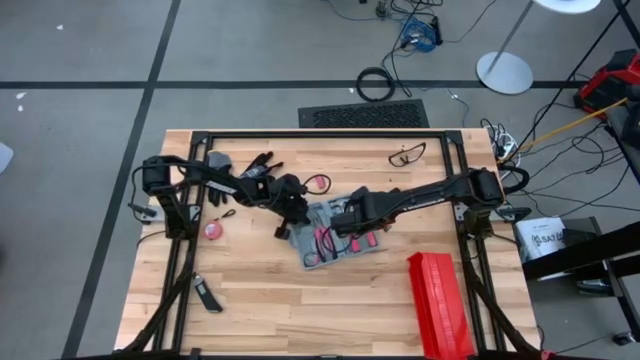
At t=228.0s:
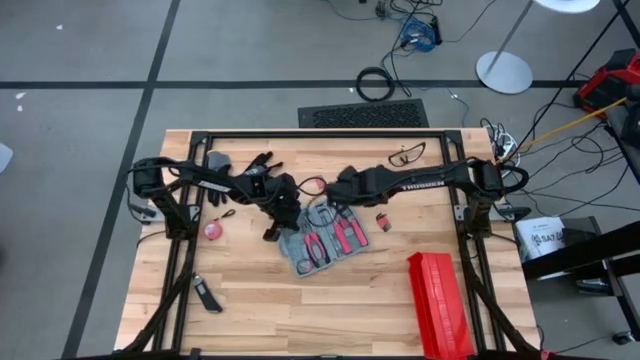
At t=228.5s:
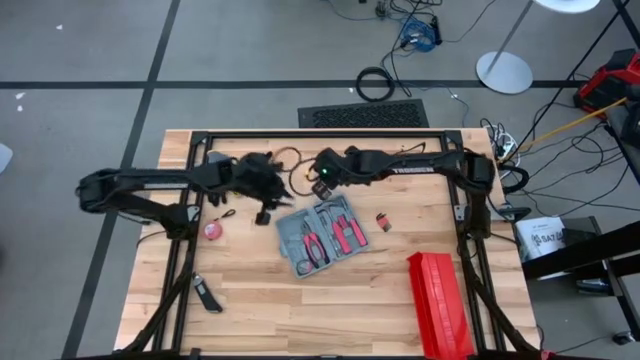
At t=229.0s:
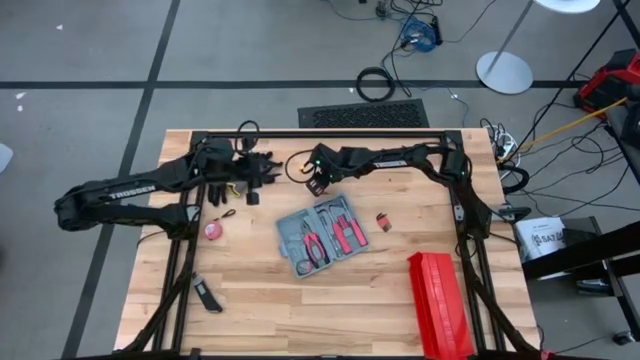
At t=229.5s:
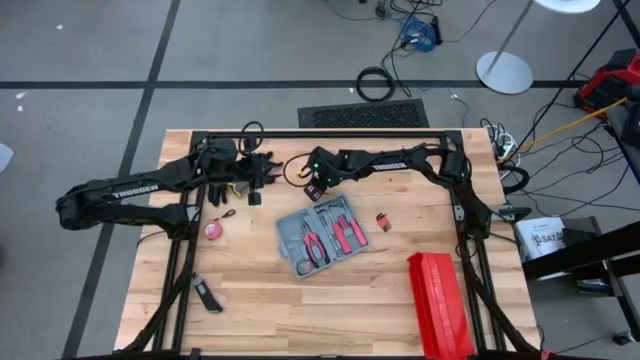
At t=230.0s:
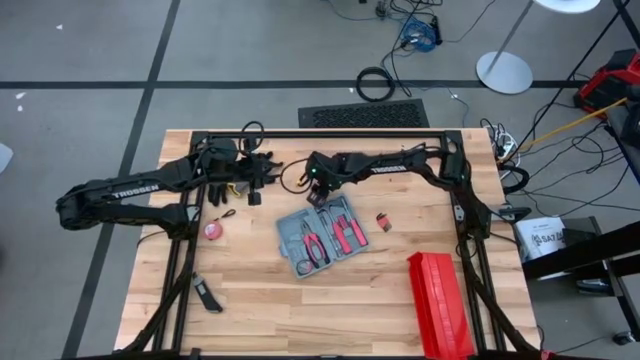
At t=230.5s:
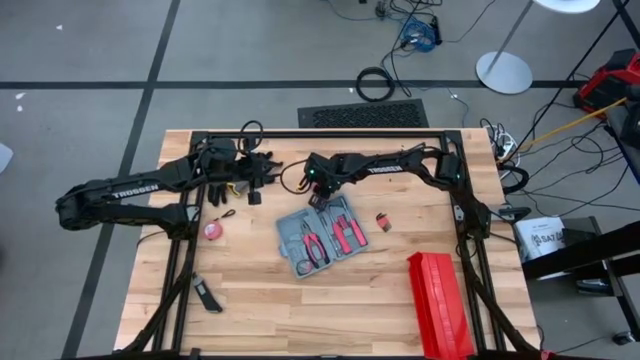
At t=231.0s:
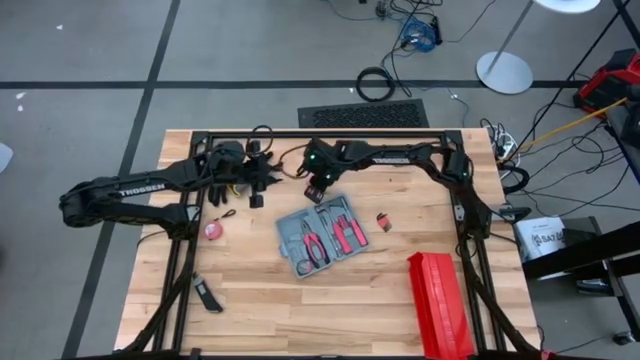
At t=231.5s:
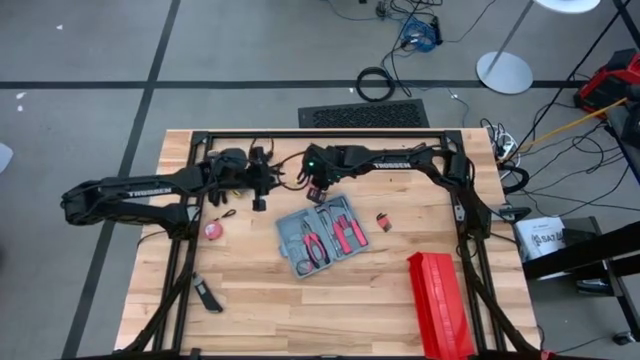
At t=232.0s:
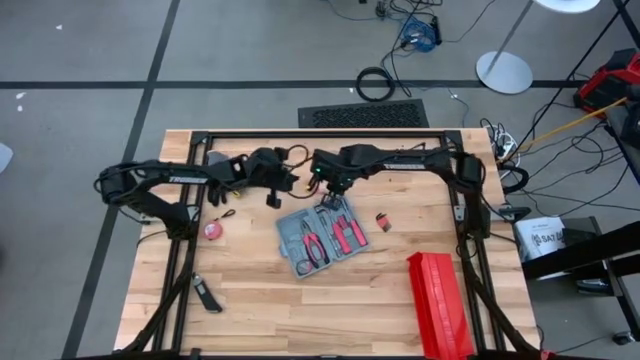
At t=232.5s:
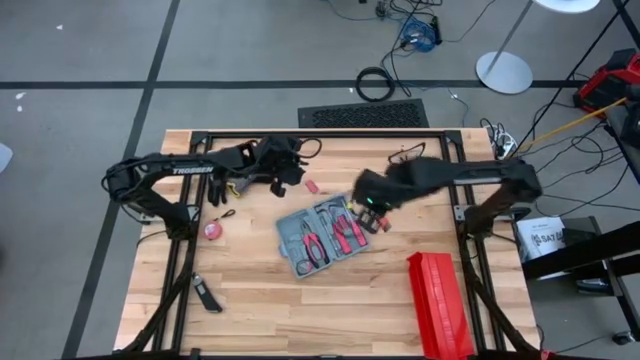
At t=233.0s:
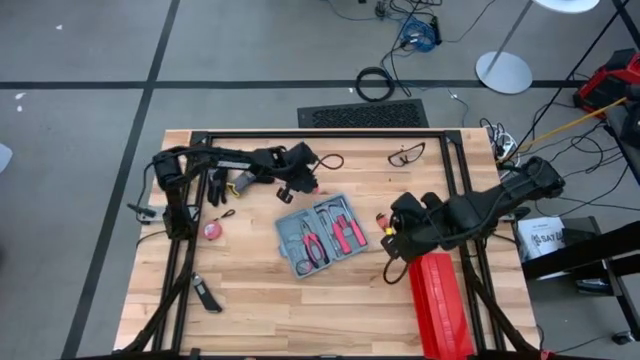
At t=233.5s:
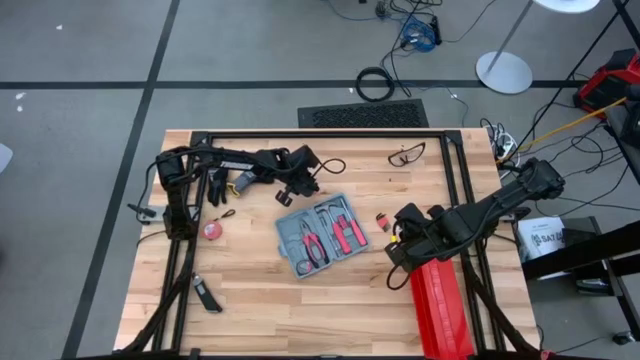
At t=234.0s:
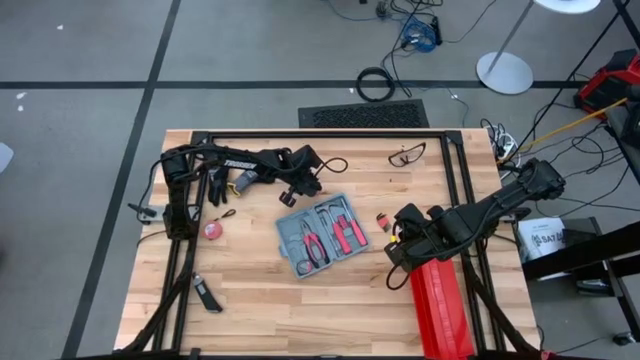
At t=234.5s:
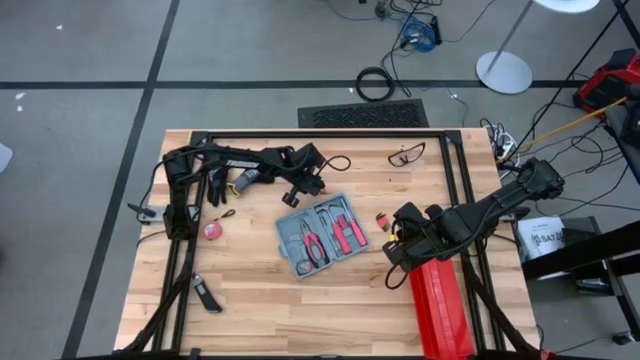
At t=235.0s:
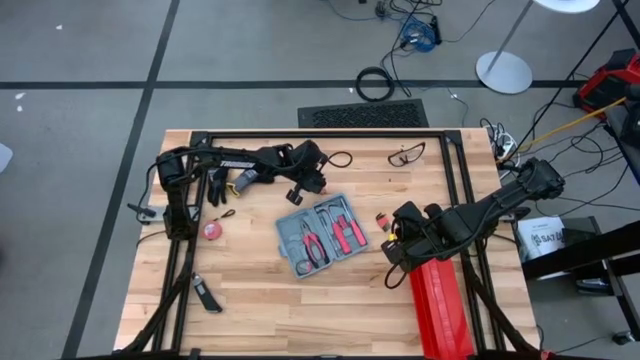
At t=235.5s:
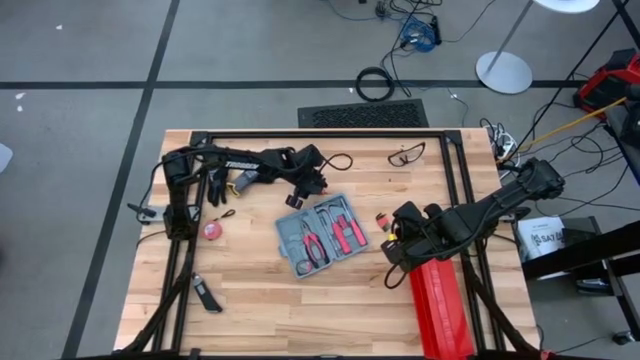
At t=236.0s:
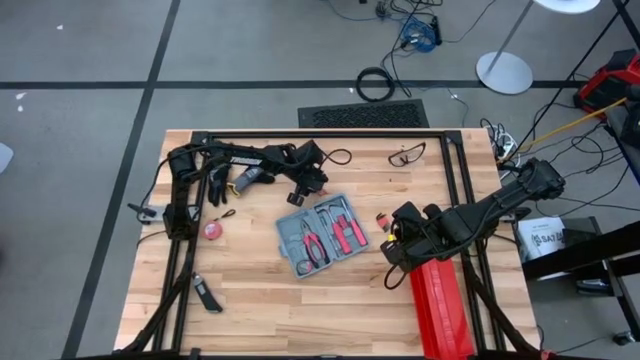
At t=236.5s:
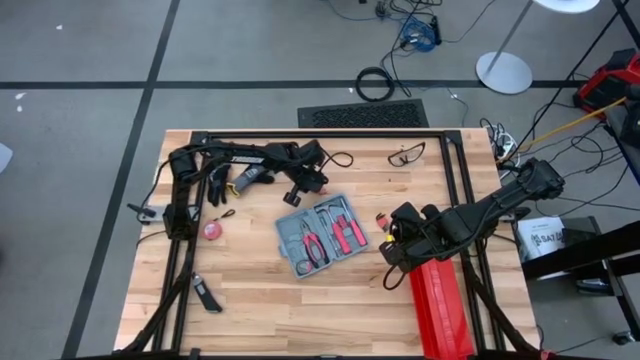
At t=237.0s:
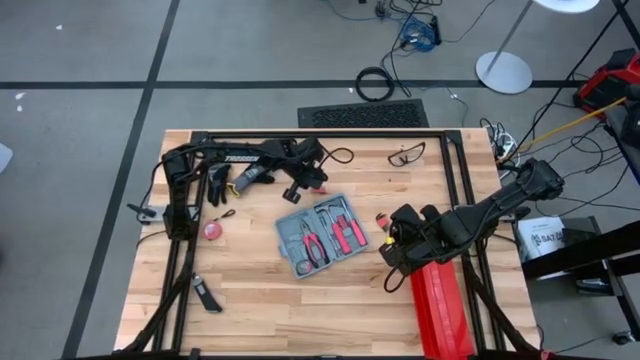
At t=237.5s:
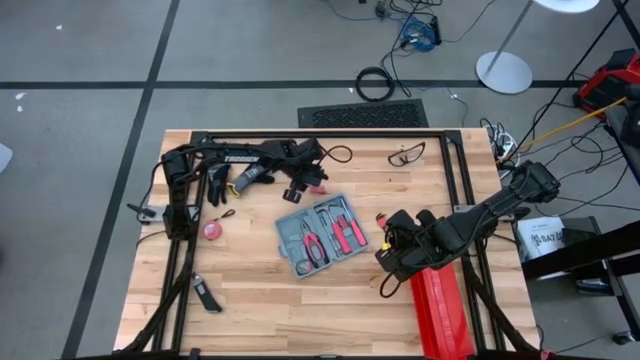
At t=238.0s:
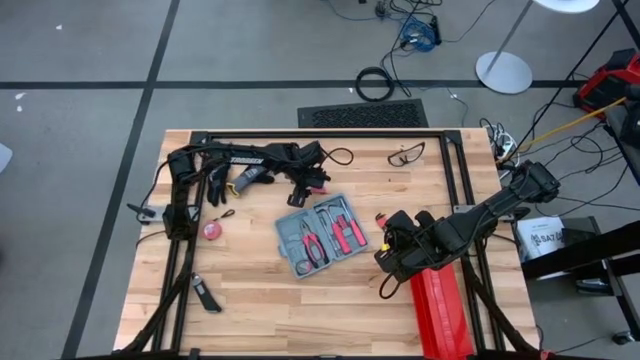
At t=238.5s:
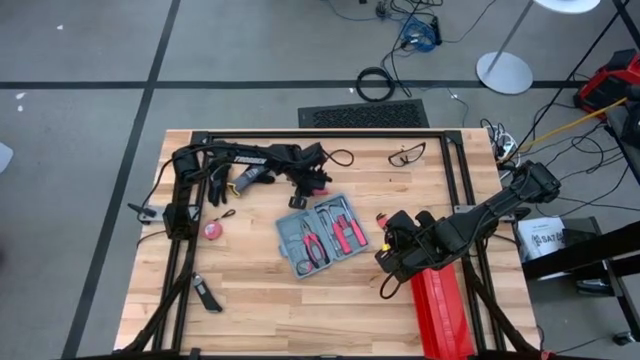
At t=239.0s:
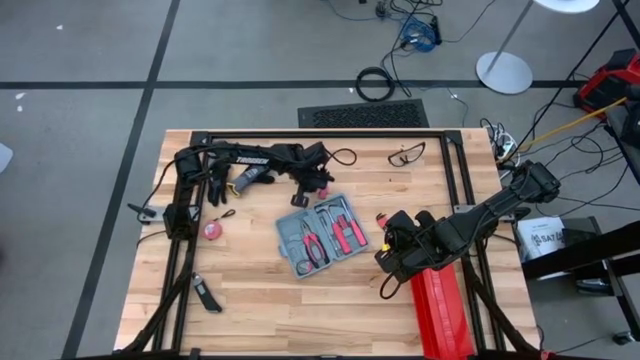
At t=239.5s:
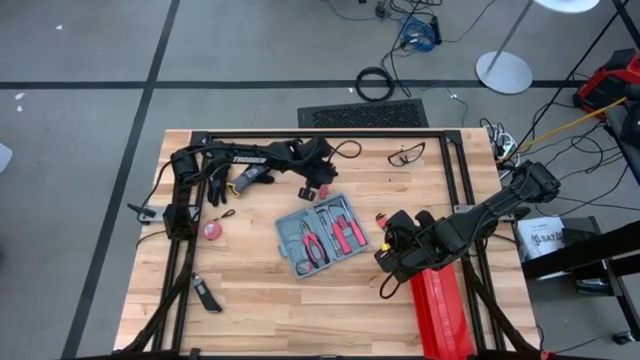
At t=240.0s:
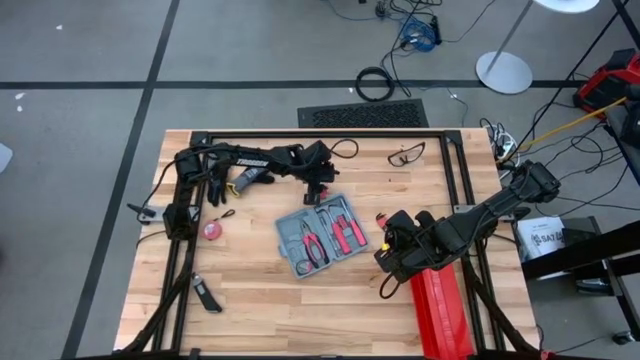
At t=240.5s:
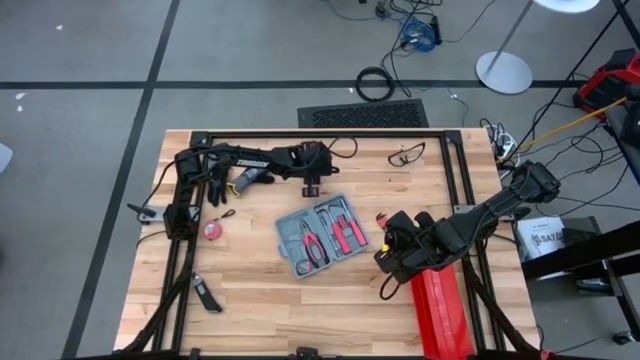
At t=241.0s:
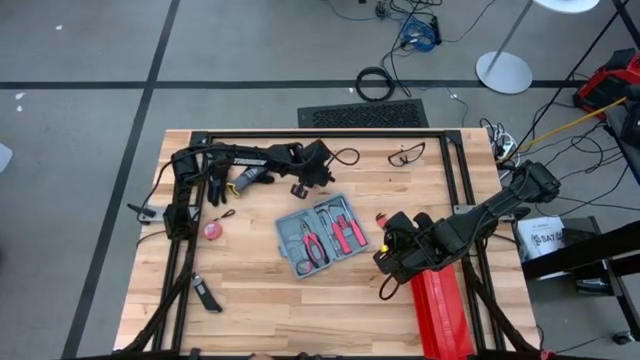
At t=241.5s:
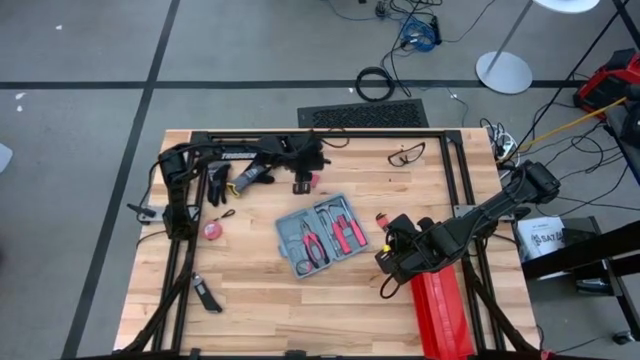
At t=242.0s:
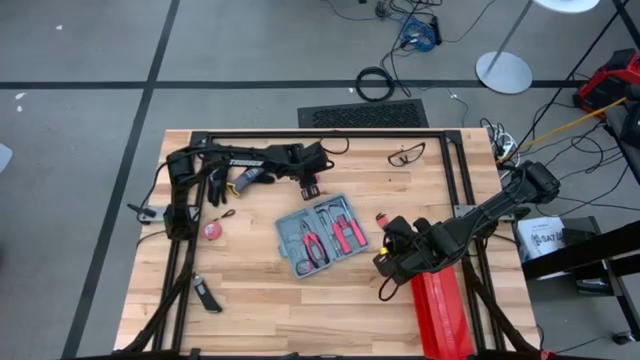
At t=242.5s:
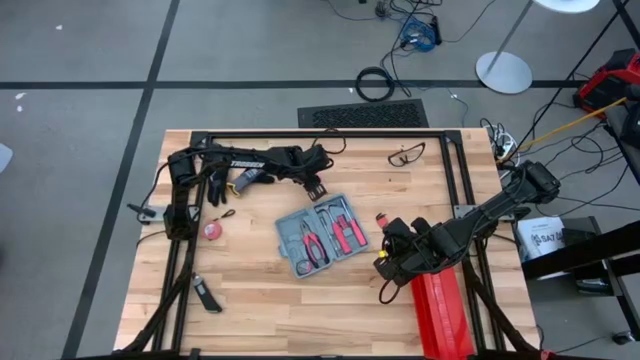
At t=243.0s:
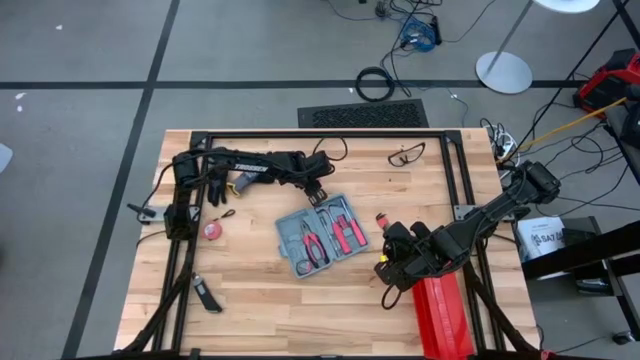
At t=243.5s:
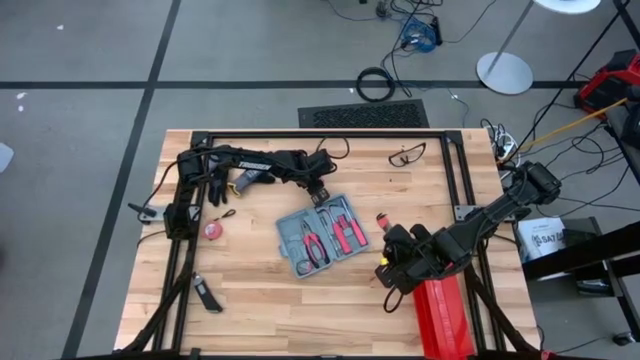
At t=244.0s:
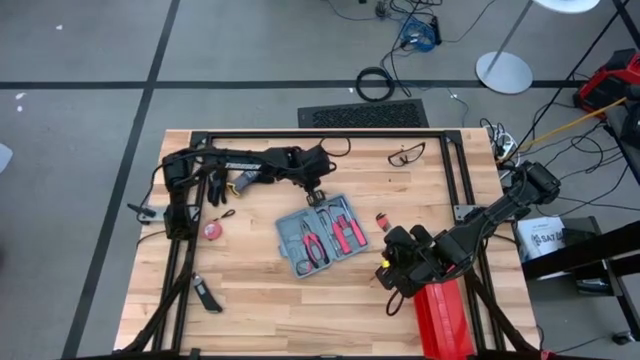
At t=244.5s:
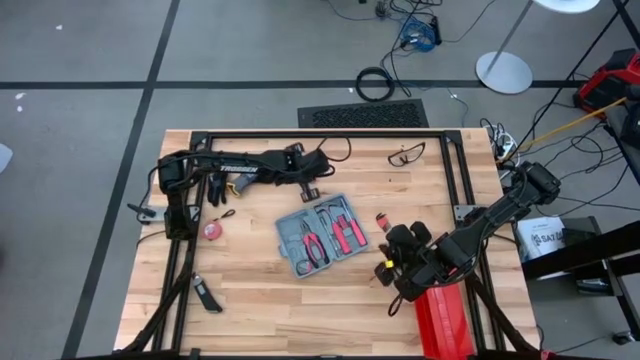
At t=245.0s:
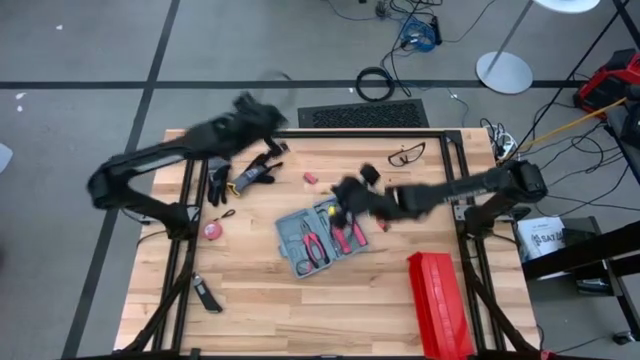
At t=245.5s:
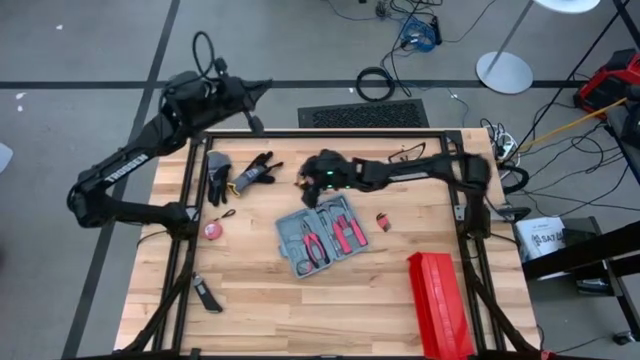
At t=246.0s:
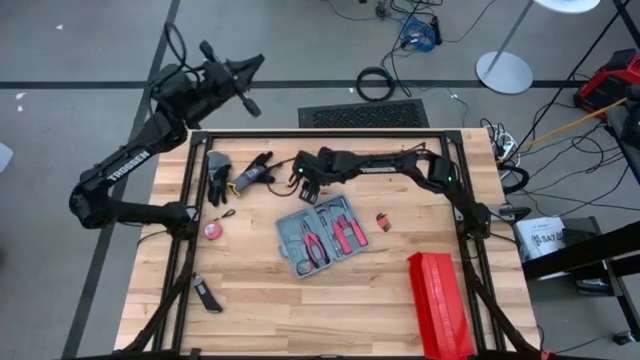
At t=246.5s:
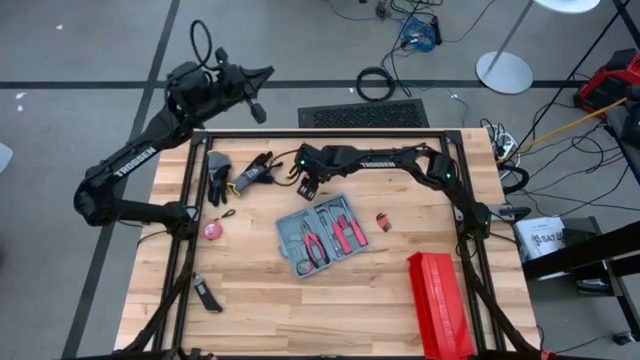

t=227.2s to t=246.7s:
Task: prefit tool cases
Put the red terminal block into the gray prefit tools case

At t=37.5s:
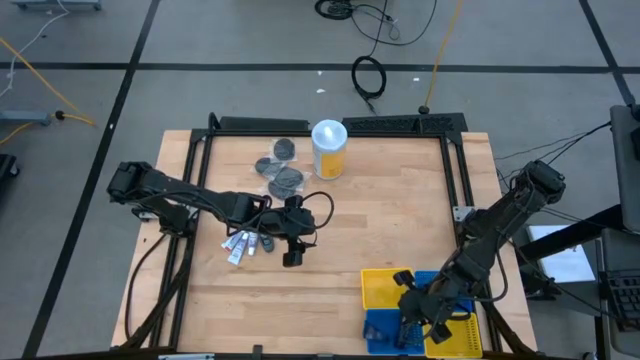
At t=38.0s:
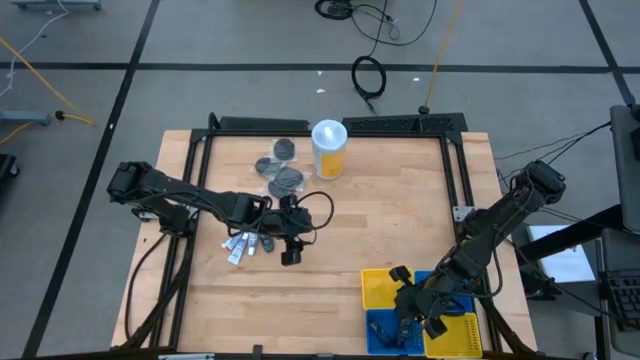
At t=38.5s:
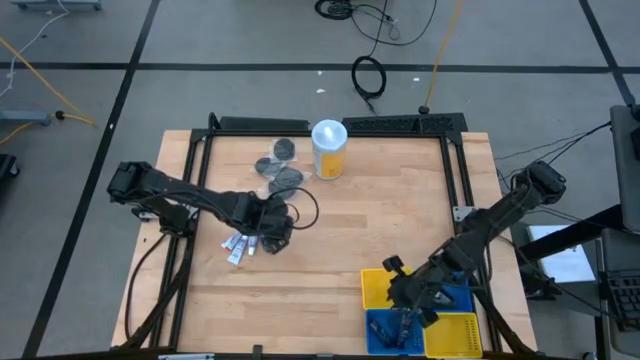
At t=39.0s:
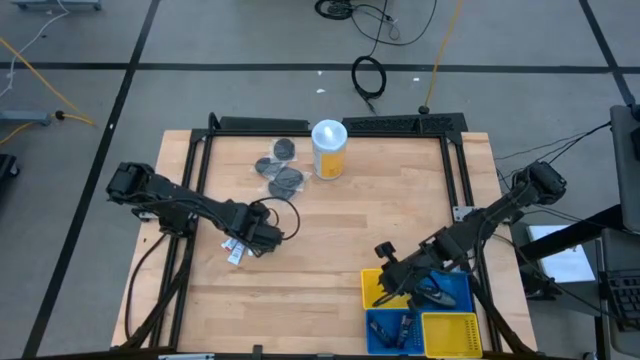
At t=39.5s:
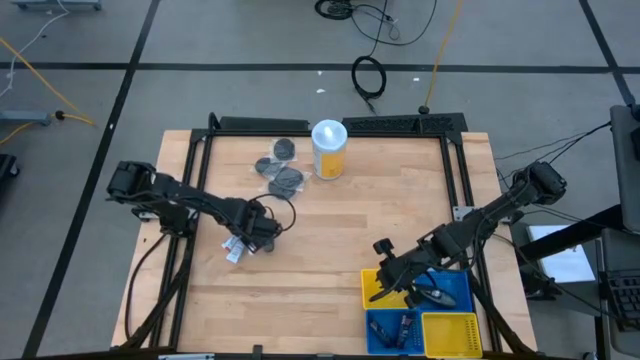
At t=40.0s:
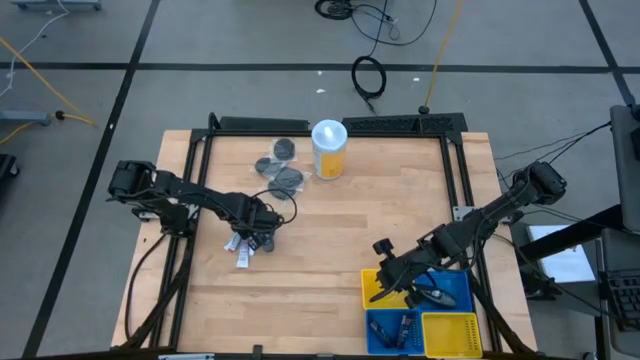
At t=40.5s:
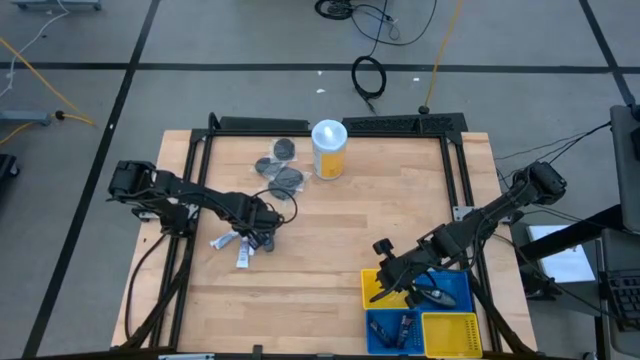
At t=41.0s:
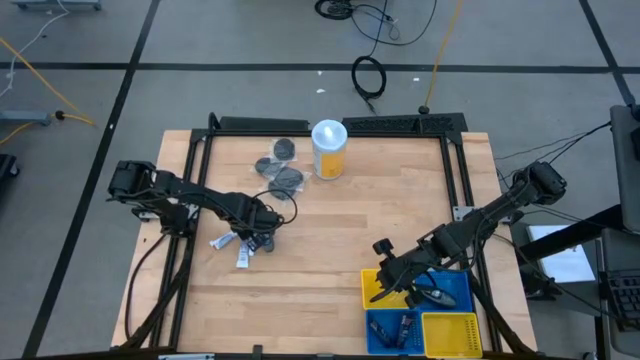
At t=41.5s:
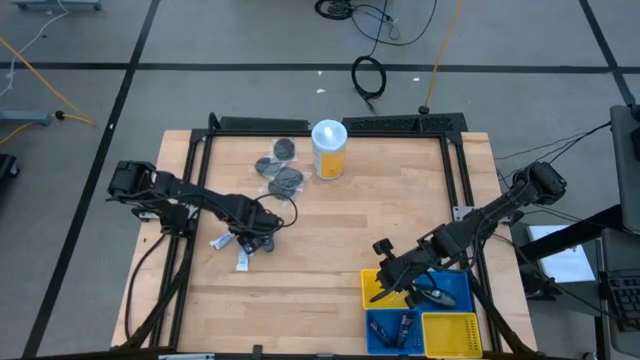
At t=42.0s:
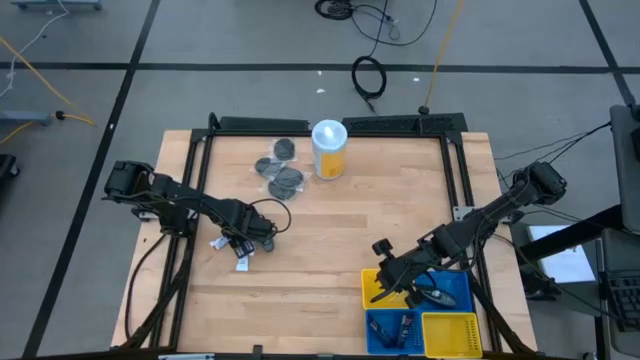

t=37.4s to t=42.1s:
Task: Pick & Place Travel size toiletries
Put the left toothpaste into the top yellow basket
